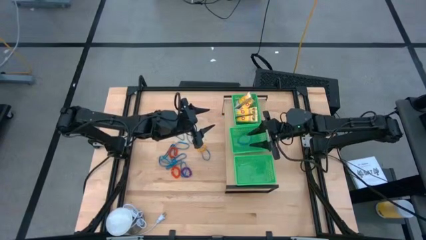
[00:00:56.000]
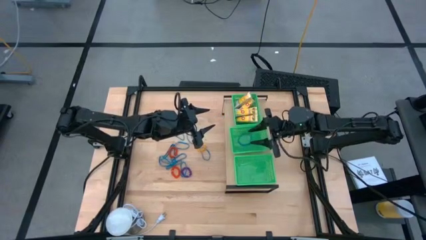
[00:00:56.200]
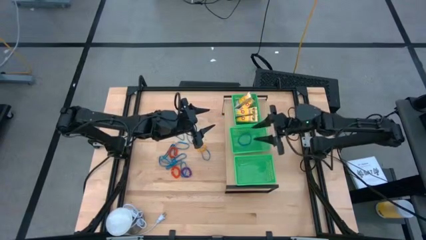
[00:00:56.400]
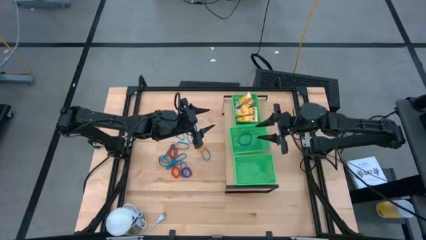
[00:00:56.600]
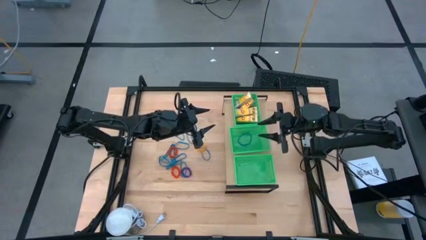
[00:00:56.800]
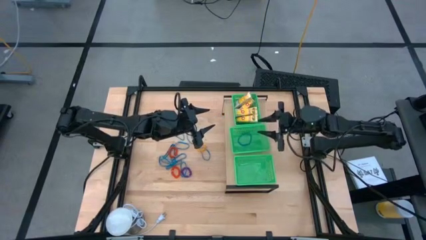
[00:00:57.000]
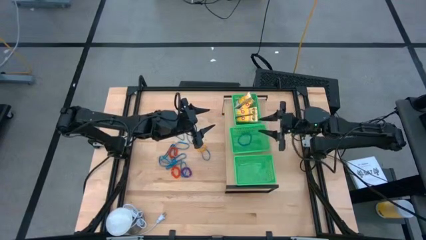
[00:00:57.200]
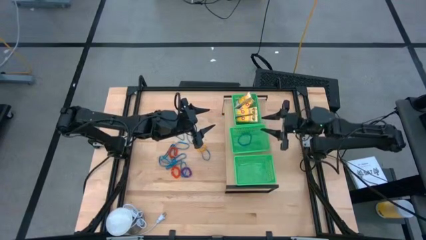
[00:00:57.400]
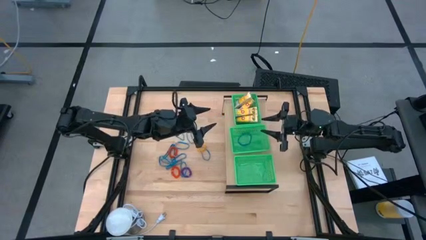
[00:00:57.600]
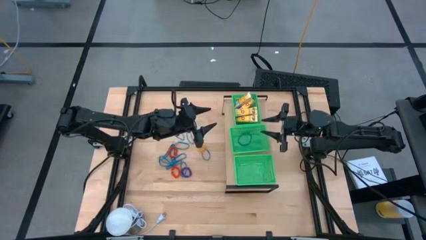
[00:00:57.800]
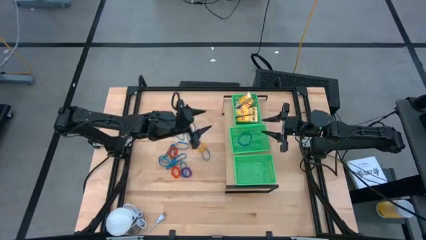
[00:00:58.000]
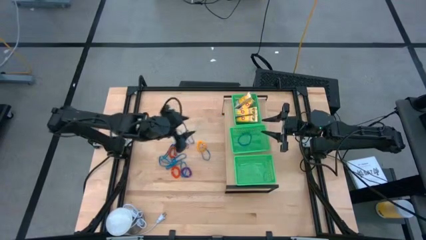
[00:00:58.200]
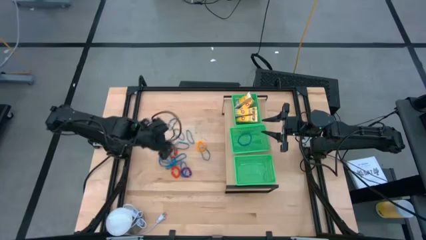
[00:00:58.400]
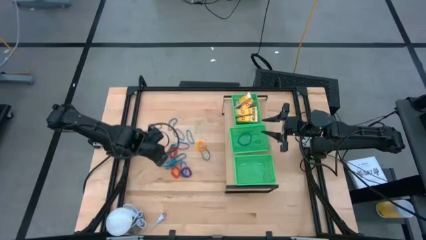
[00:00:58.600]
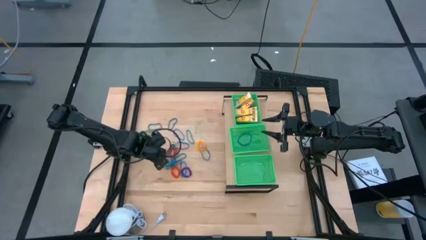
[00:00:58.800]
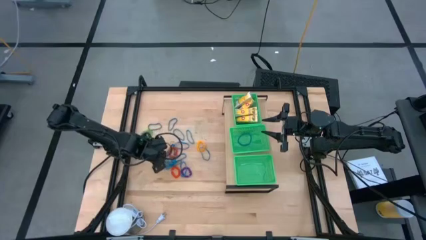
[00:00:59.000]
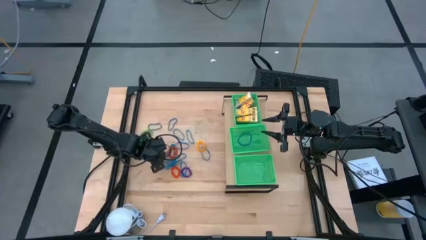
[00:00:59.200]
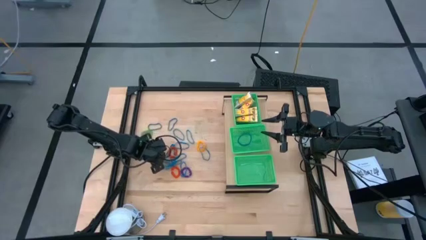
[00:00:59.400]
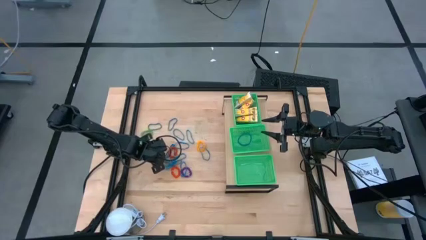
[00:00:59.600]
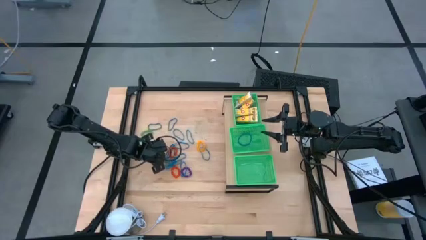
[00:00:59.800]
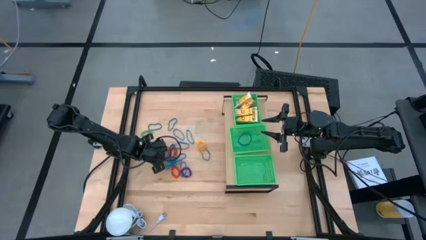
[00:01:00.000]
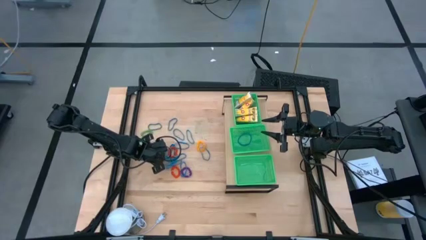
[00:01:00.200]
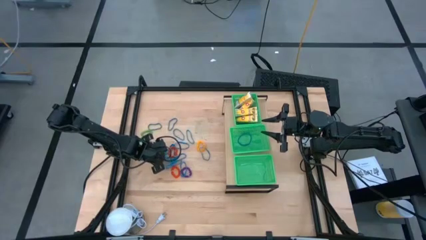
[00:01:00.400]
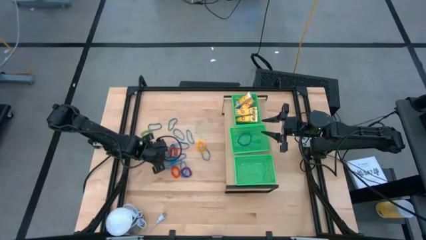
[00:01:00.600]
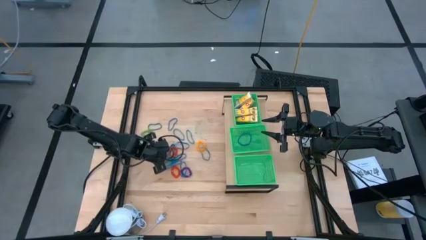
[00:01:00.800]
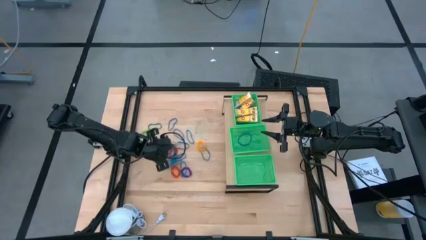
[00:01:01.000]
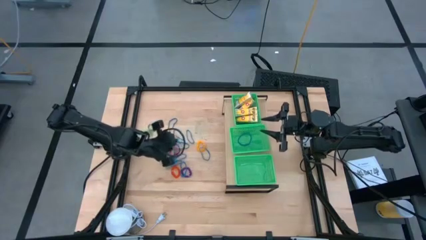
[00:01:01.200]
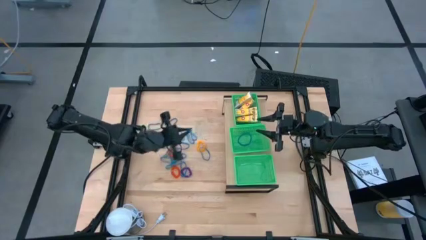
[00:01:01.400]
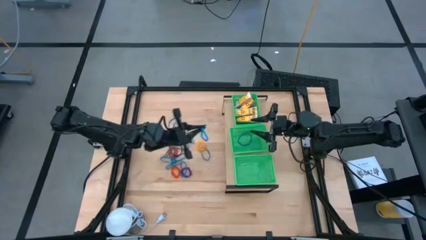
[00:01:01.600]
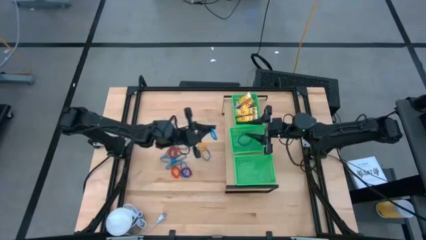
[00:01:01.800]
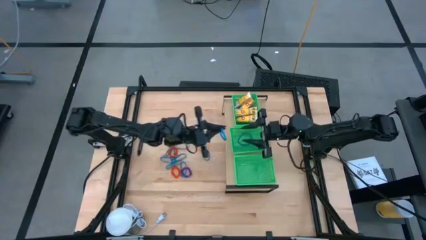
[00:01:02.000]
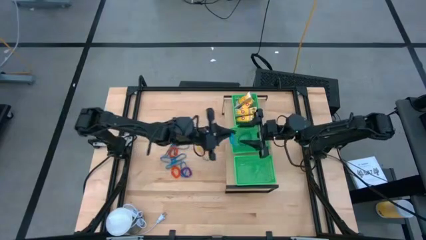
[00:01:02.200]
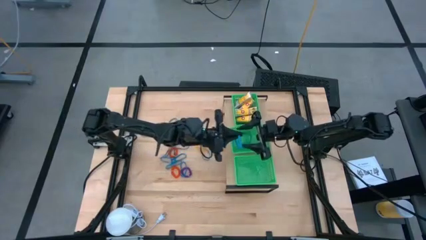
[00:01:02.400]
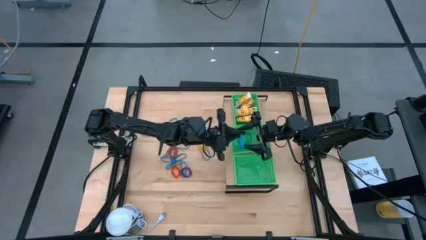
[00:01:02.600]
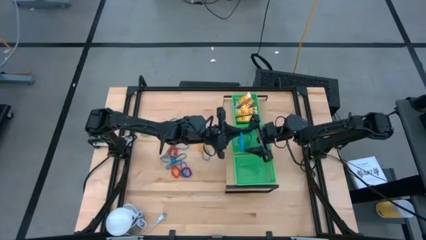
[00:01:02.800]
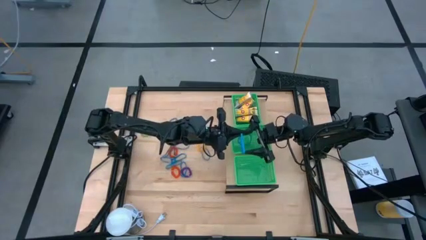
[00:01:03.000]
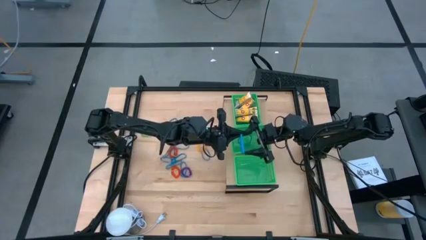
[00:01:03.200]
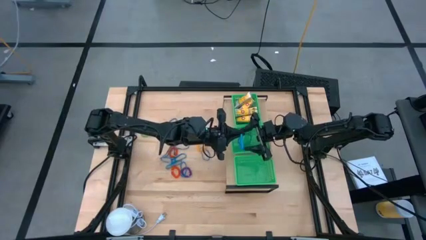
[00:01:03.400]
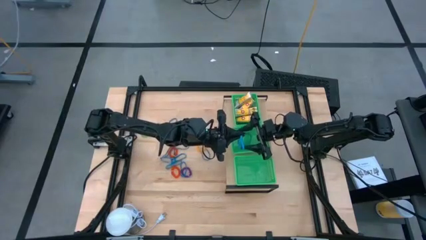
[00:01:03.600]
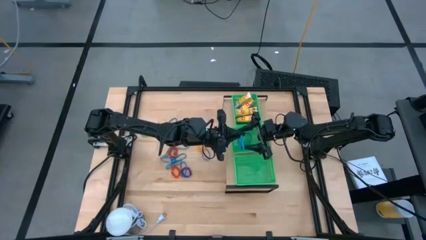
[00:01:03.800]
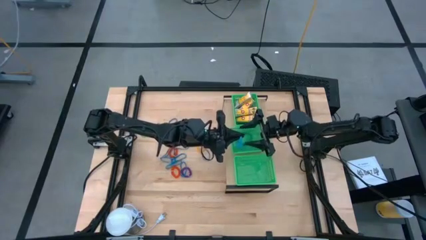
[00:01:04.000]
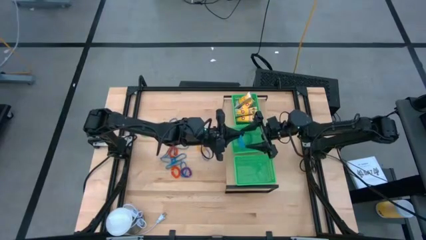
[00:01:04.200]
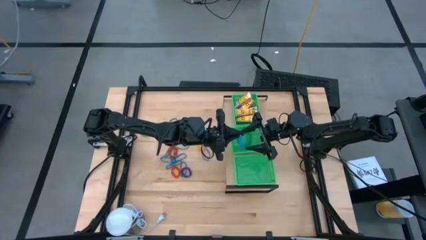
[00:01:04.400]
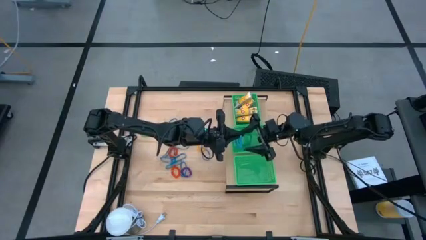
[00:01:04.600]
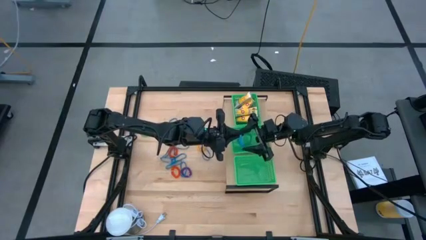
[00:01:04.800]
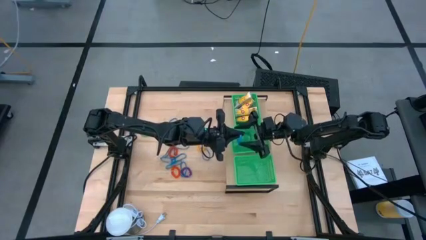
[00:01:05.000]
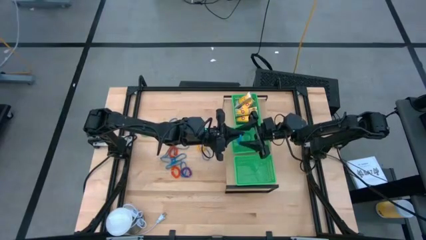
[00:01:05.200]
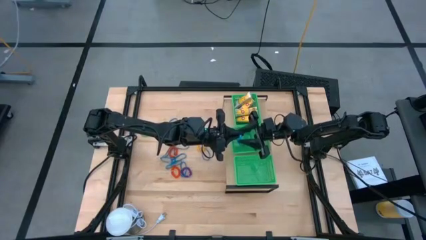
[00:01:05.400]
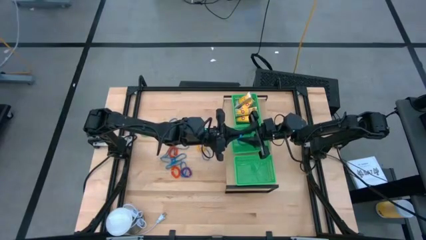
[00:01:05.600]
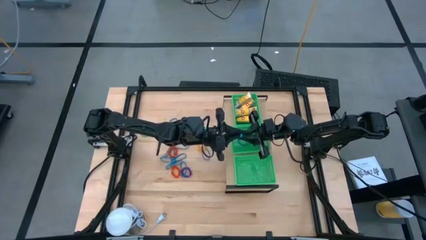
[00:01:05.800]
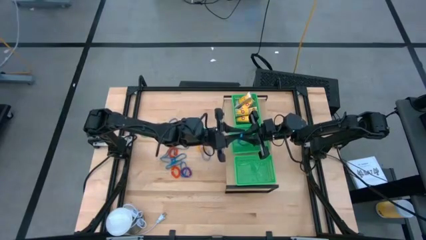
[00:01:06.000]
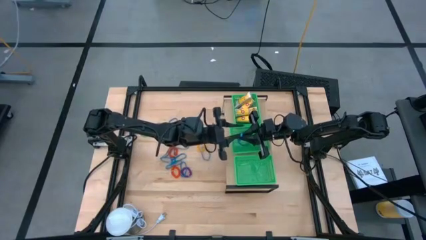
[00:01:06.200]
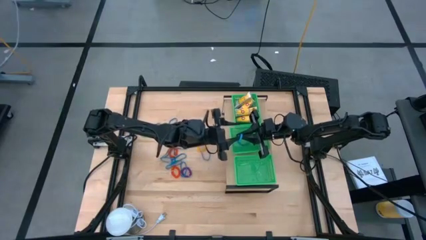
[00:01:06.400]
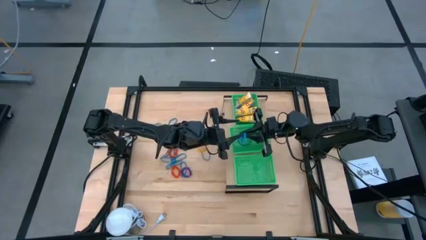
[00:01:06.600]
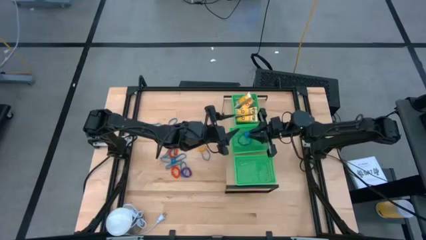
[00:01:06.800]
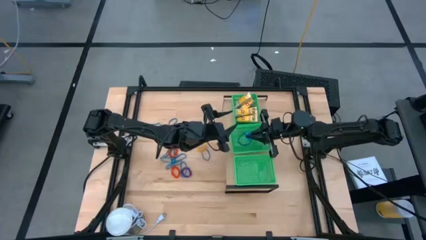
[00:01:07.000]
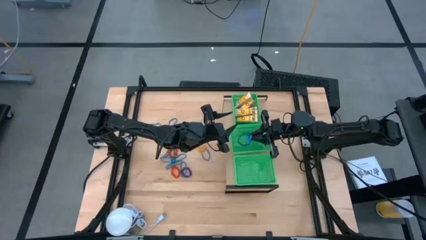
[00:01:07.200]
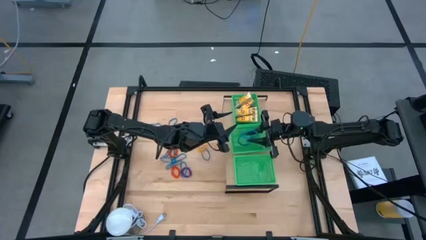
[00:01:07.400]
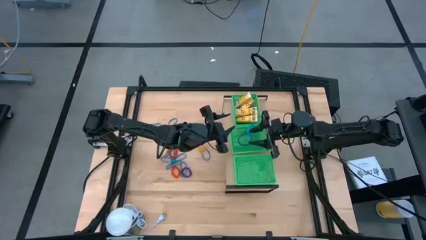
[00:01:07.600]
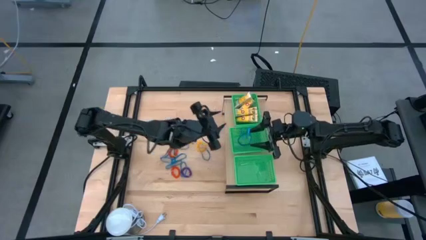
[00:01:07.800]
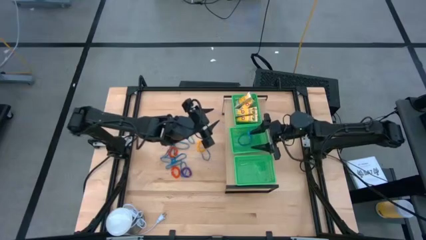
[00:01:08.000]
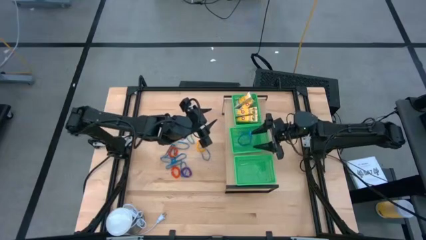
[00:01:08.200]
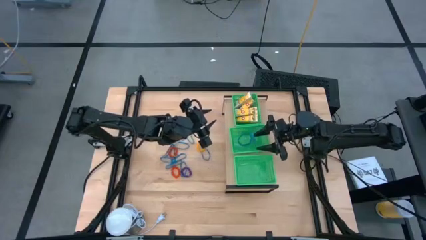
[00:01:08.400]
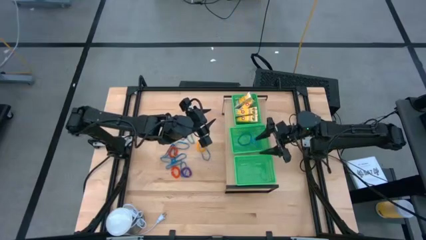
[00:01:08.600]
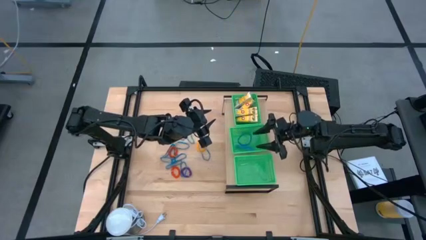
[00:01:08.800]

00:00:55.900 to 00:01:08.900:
Task: Pick & Place Office Desk Supplies
Put the blue rubber band into the middle green bin
